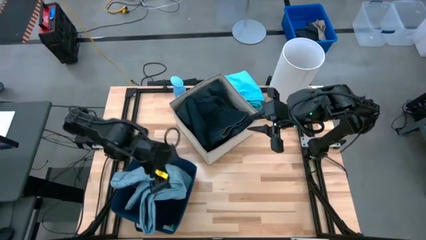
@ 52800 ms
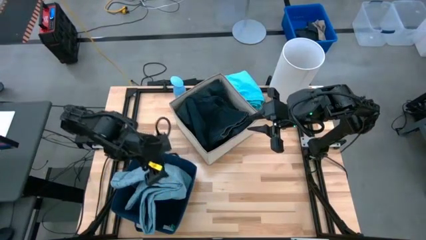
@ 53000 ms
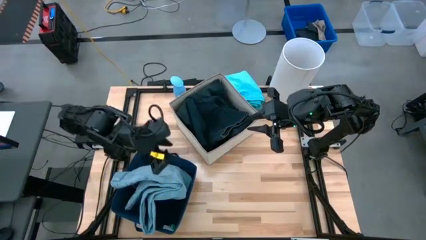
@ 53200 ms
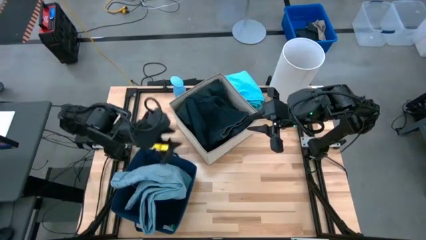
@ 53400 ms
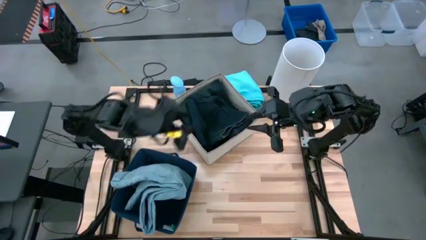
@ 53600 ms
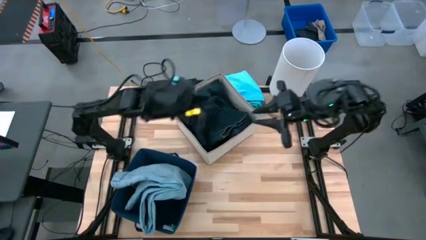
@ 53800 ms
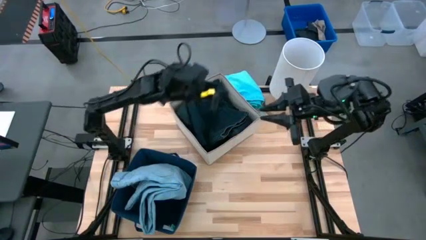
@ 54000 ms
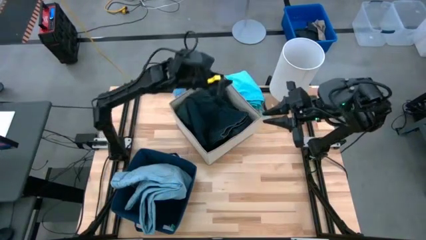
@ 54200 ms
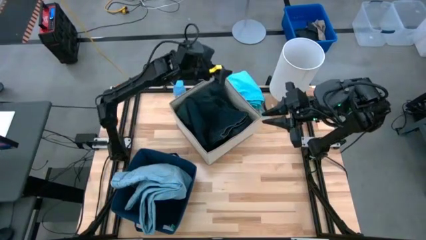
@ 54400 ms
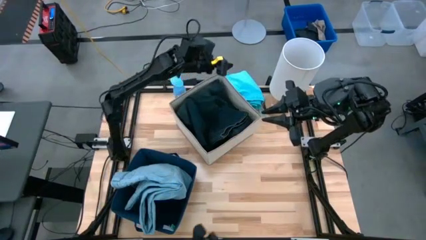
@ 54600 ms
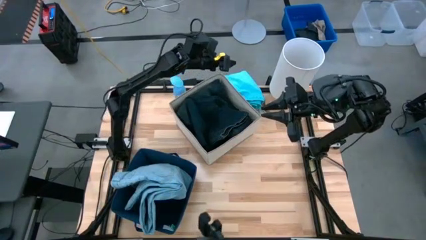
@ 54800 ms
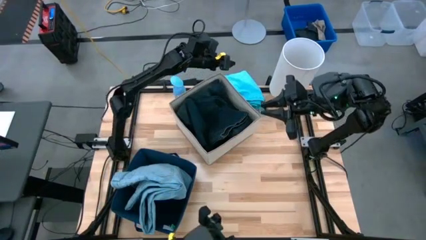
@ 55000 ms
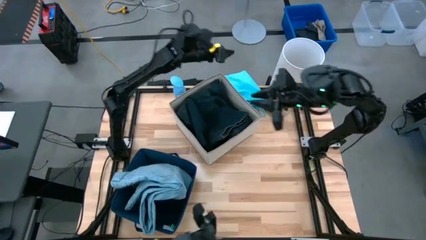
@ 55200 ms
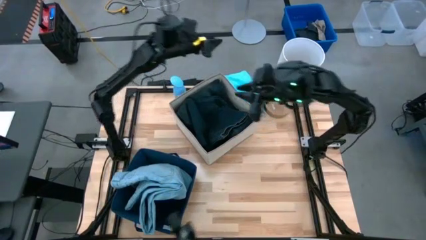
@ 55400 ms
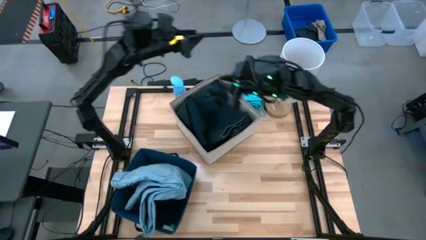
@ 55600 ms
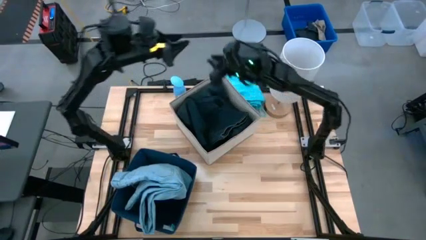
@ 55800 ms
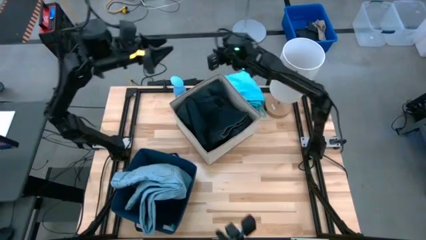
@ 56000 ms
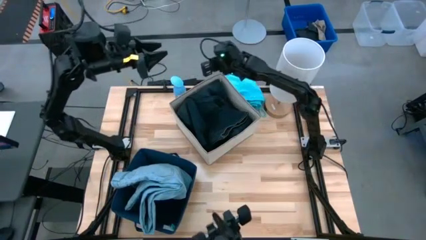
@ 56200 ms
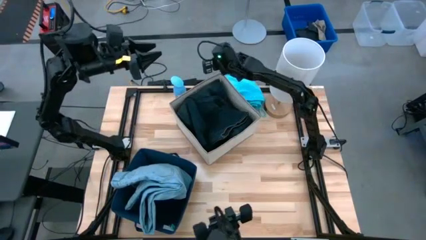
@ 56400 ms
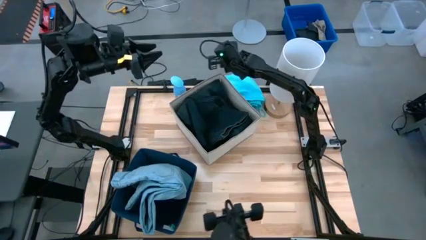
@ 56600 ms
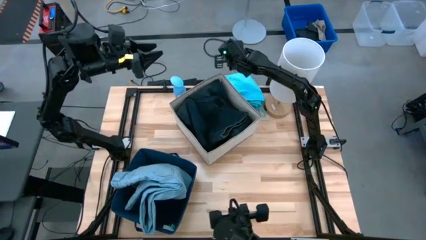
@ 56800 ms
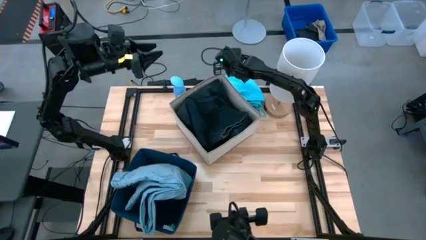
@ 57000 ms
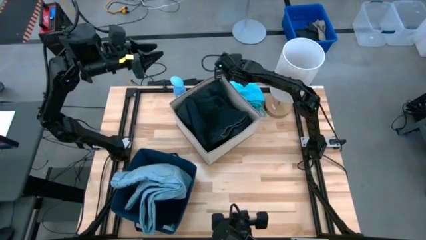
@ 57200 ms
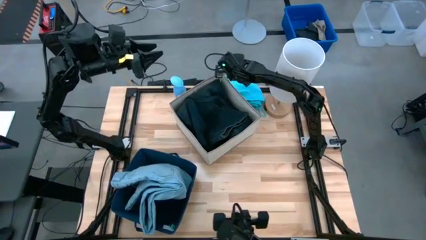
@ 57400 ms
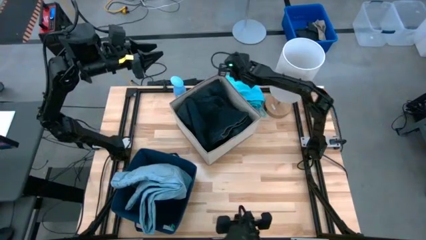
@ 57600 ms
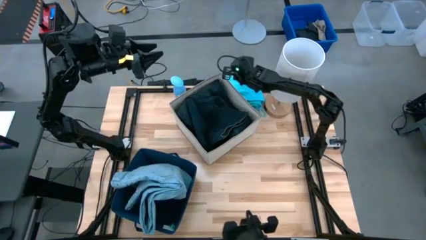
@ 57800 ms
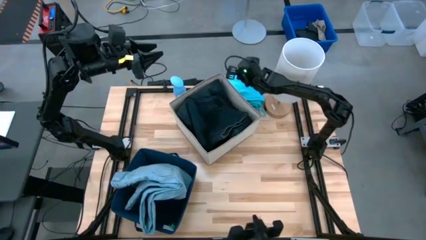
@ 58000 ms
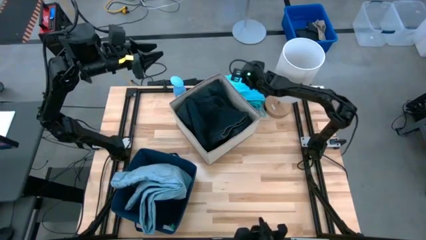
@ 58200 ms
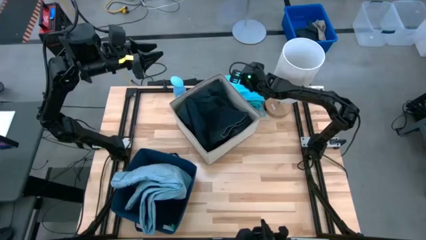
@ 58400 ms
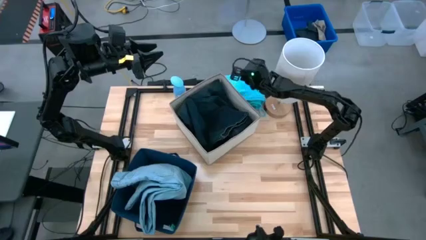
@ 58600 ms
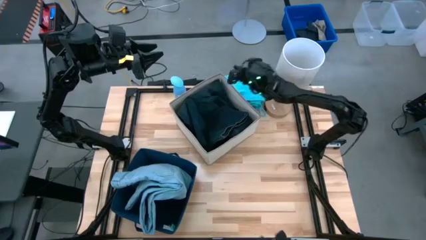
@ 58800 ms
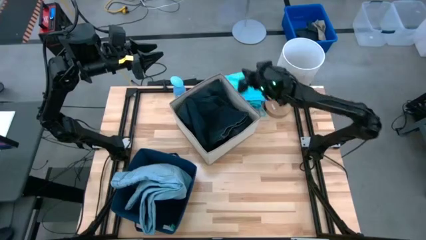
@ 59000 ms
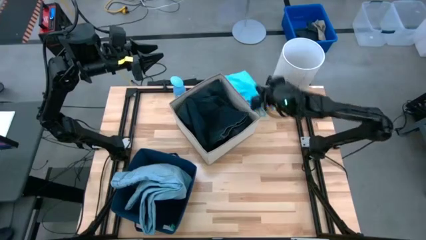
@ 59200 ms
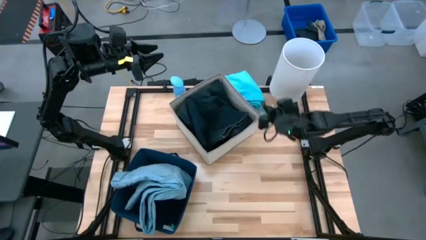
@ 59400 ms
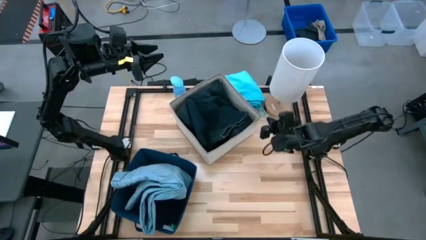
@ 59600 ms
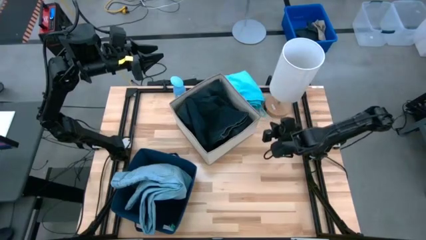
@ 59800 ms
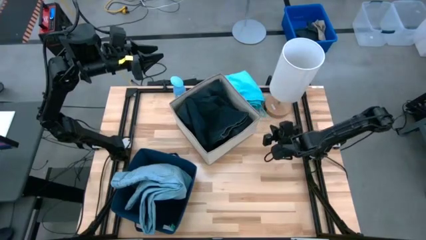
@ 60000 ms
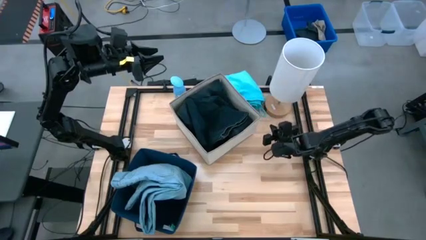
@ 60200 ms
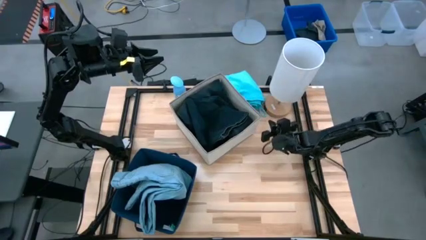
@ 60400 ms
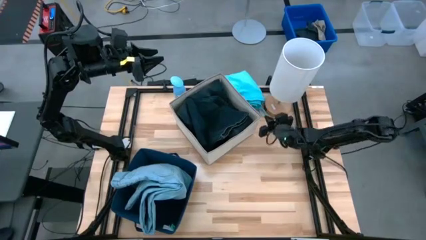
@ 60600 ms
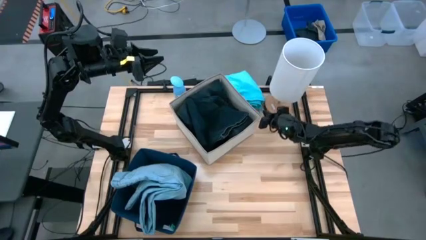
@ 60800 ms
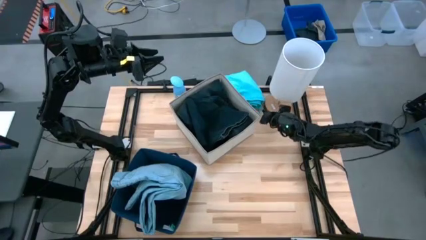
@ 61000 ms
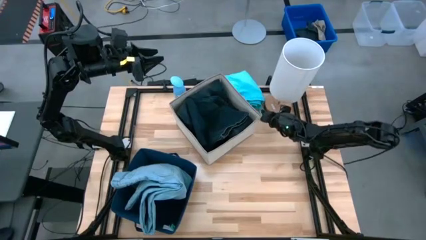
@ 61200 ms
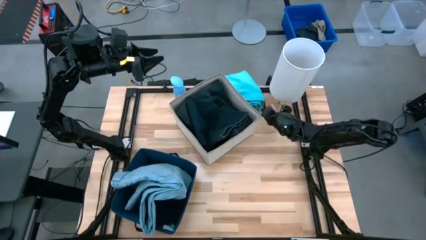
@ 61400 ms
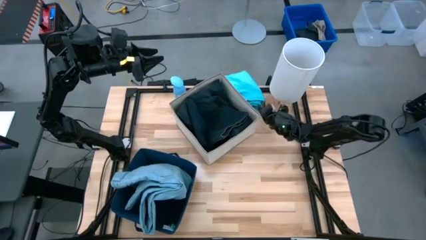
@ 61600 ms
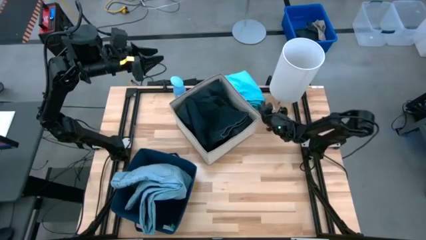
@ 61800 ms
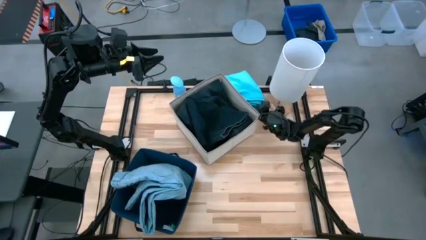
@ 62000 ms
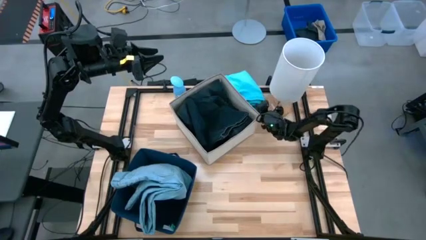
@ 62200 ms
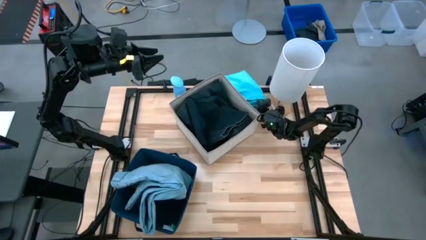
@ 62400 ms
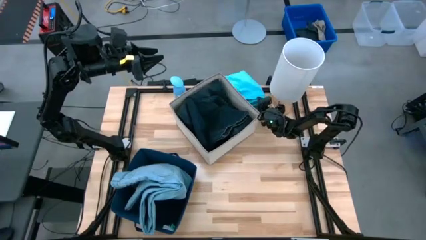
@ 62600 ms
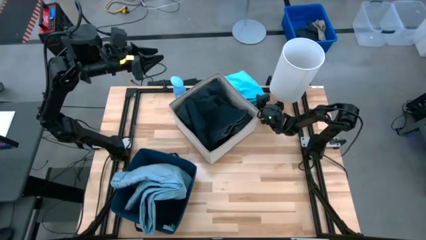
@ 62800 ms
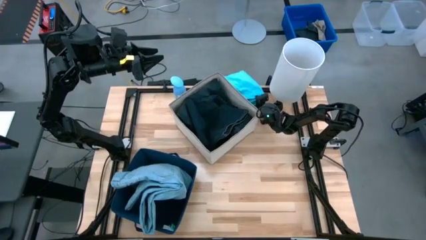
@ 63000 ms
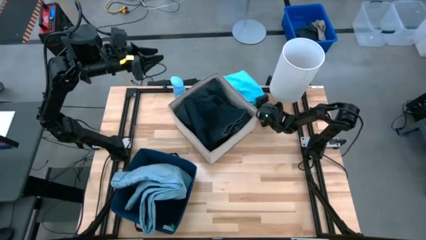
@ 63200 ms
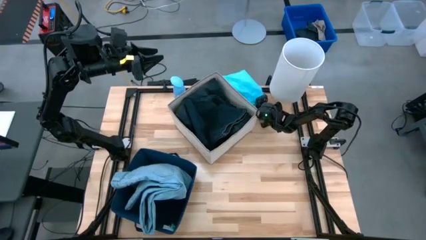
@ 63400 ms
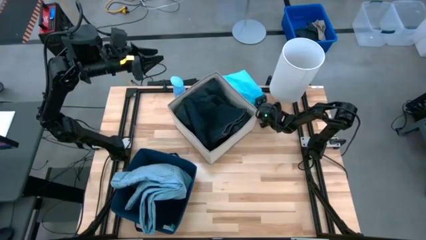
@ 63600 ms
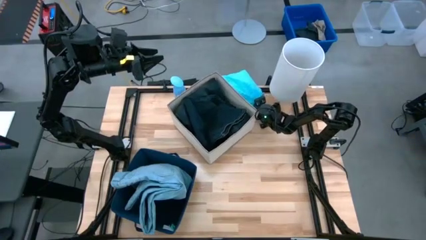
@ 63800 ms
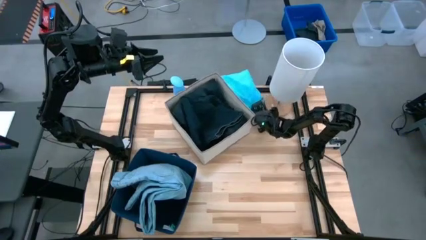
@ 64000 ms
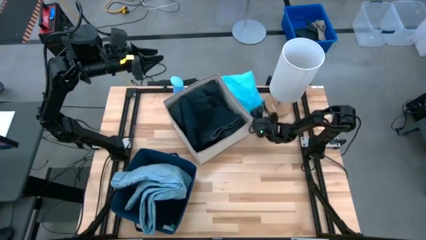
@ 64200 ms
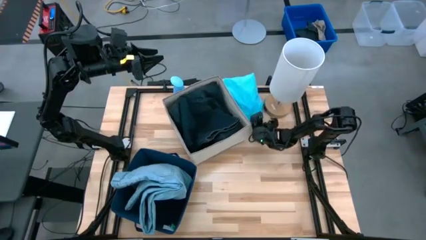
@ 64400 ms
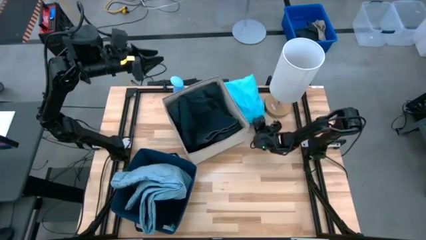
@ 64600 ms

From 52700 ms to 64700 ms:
Task: Sort clothes
Put the light blue shorts into the blue-white laundry organizer

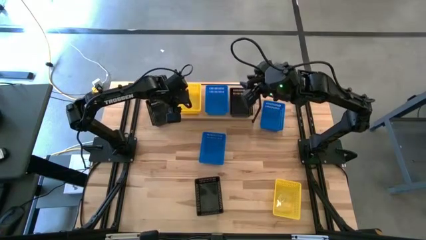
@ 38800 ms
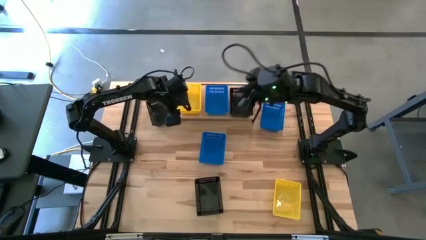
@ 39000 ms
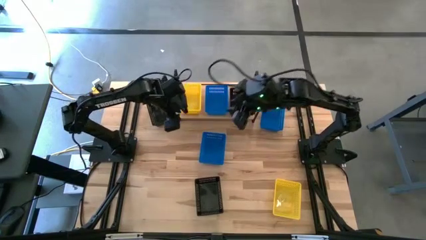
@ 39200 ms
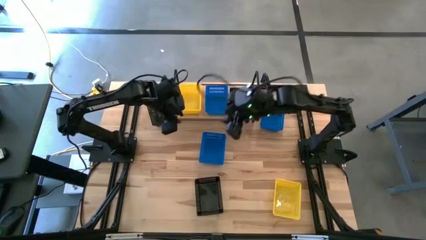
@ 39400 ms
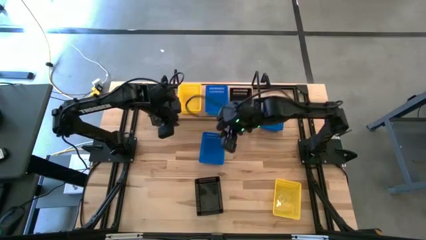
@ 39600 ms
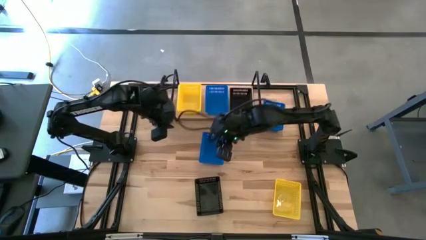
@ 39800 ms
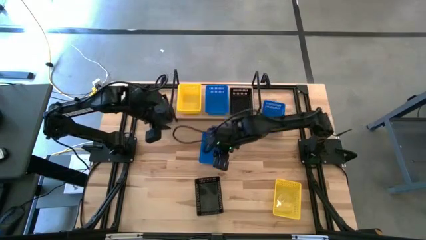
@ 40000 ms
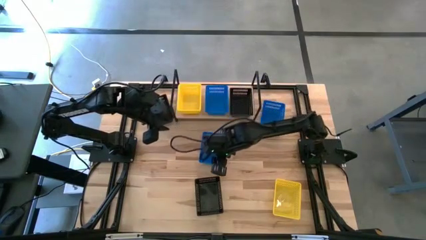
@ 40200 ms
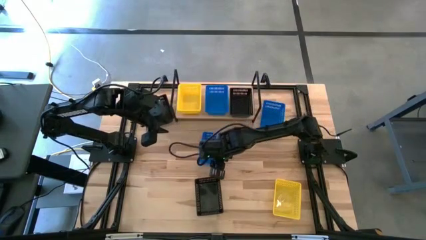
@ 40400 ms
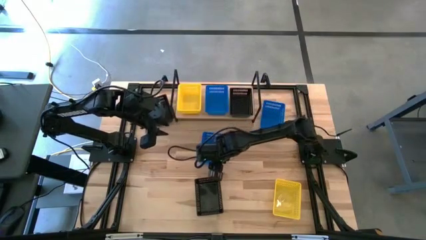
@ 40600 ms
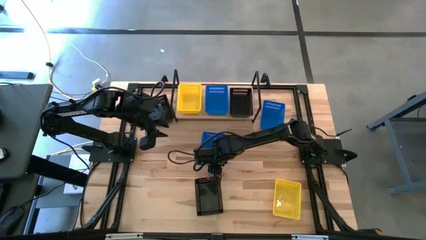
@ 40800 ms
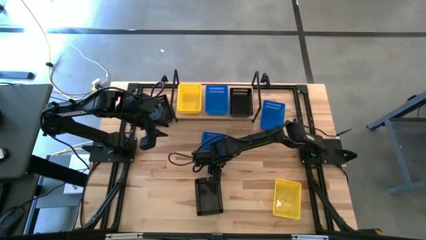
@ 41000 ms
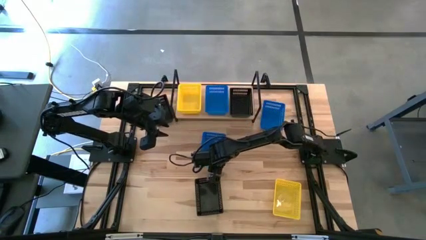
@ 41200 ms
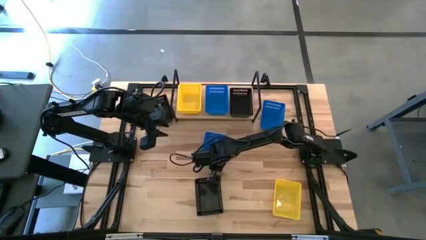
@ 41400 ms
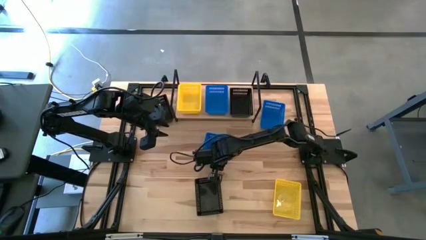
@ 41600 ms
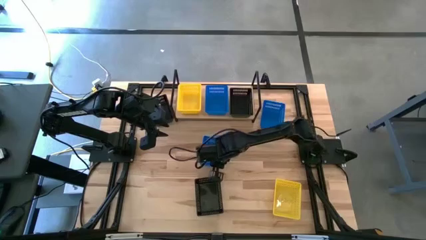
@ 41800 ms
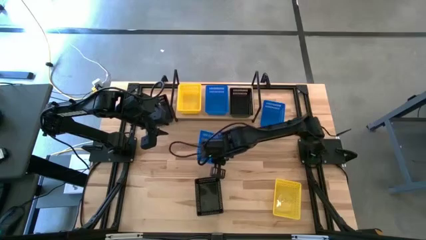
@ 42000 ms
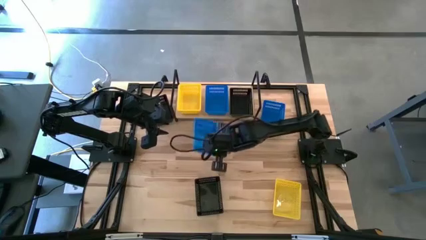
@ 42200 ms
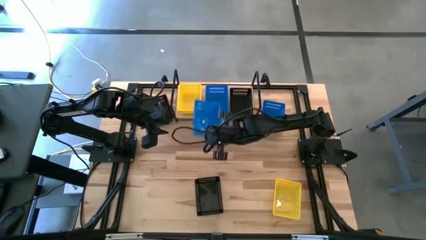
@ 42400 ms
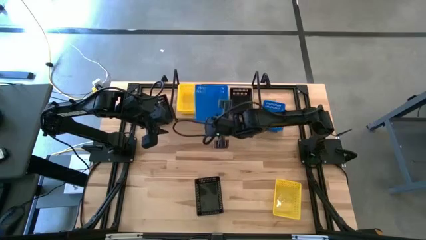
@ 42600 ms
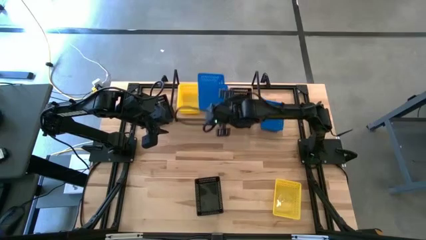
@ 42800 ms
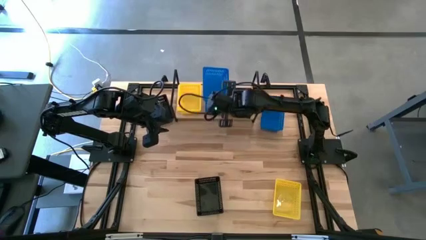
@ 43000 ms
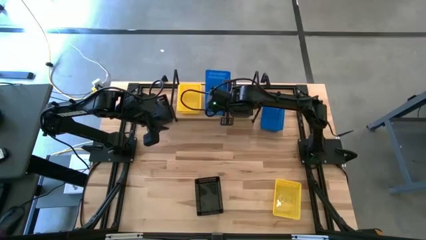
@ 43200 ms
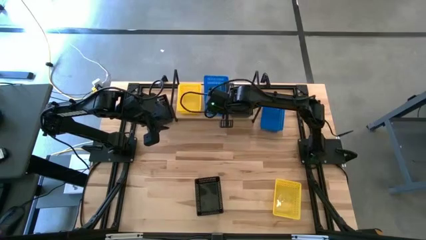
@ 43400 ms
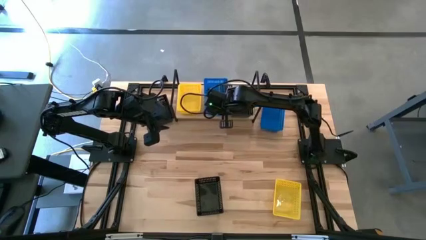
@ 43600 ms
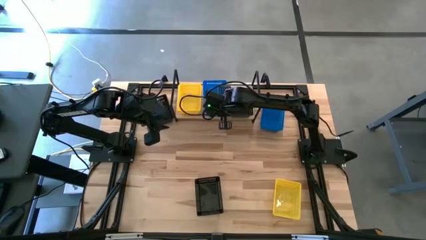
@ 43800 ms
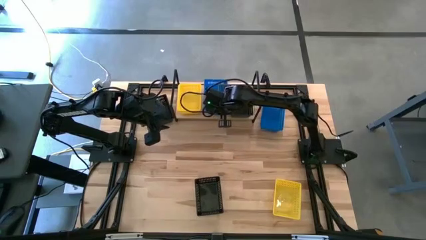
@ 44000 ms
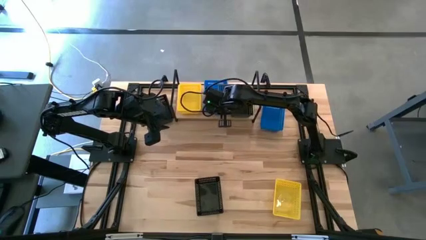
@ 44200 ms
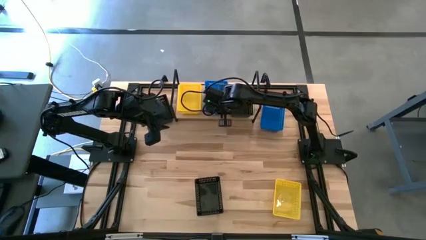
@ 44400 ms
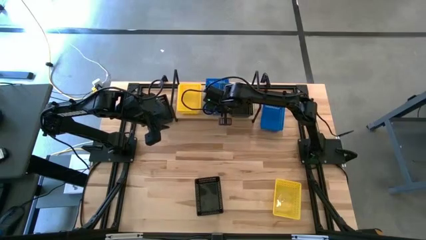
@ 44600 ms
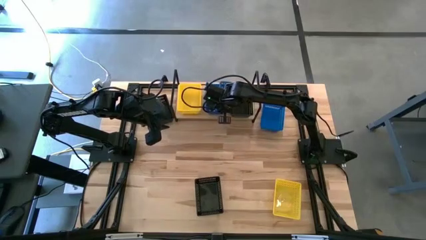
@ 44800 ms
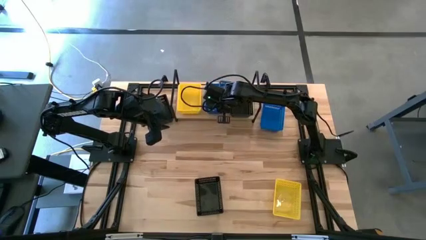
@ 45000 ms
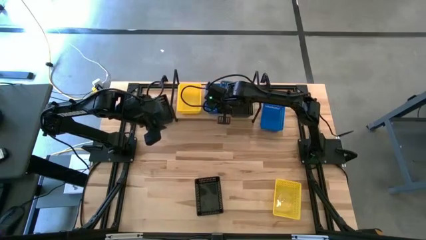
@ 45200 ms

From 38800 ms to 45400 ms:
Task: Stack baskets on shelf by color
Stack the left blue bin on top of the blue bin on the shelf
